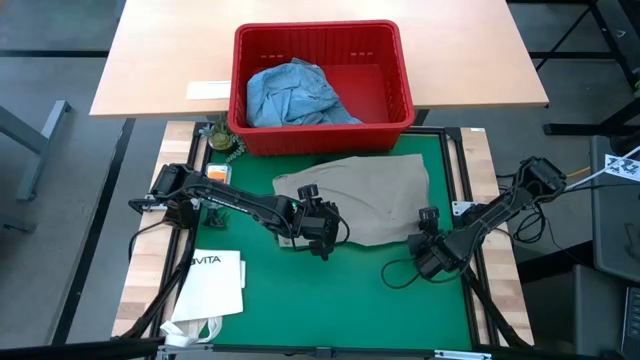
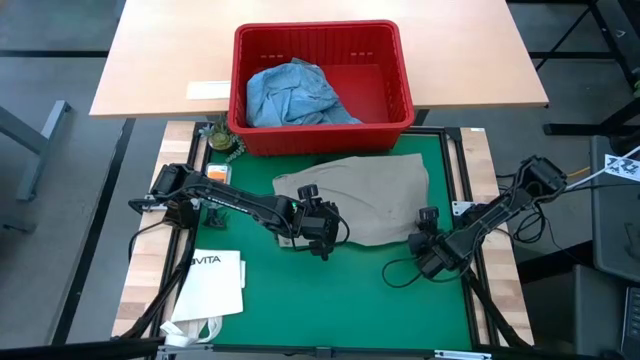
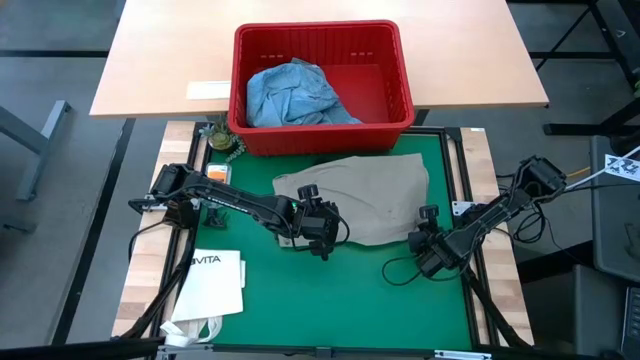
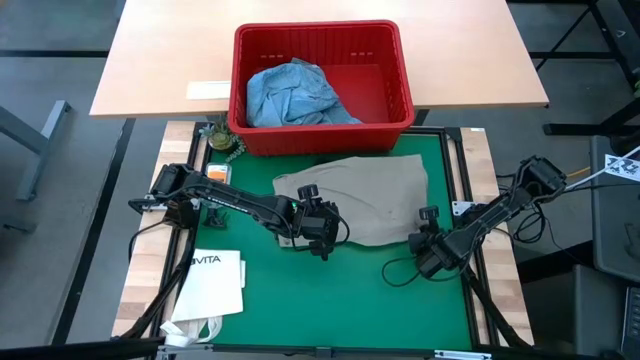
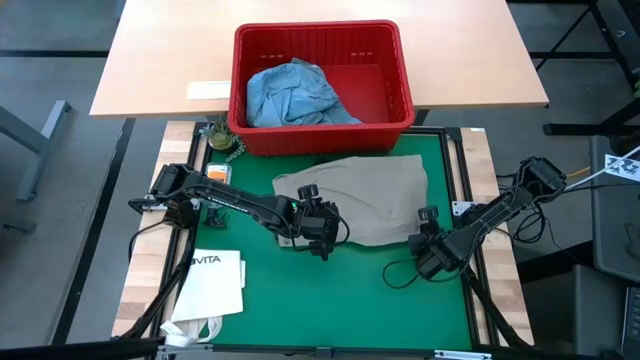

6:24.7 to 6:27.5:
Task: Fold Laundry from Bin
Fold the gray shorts

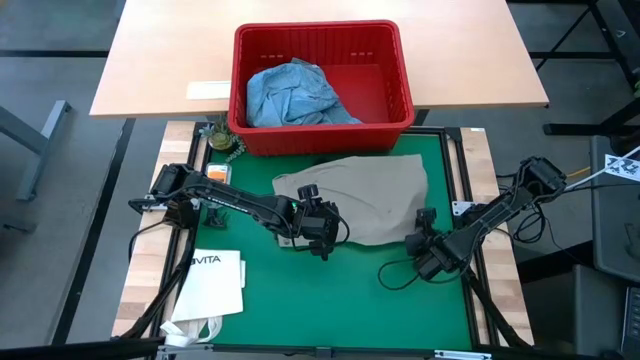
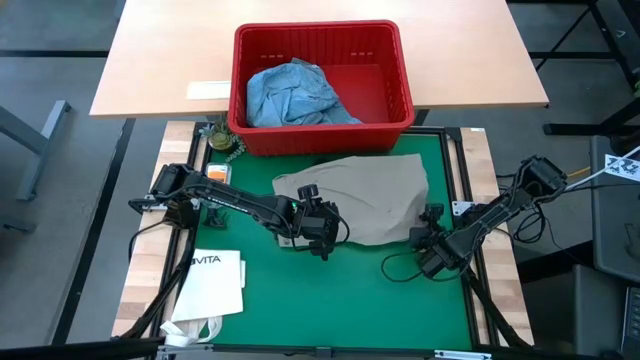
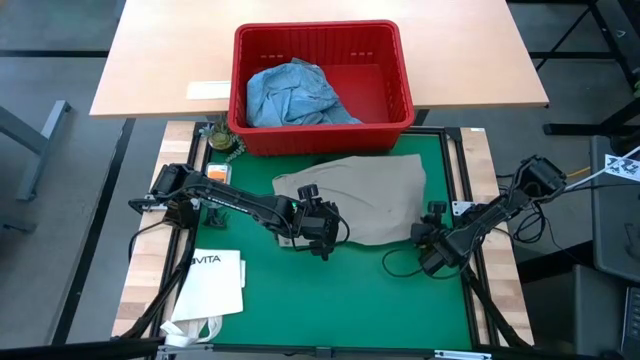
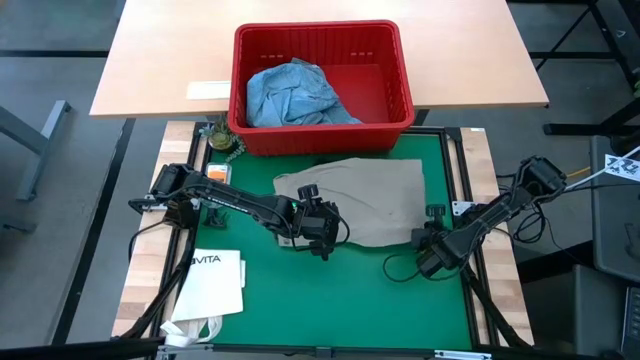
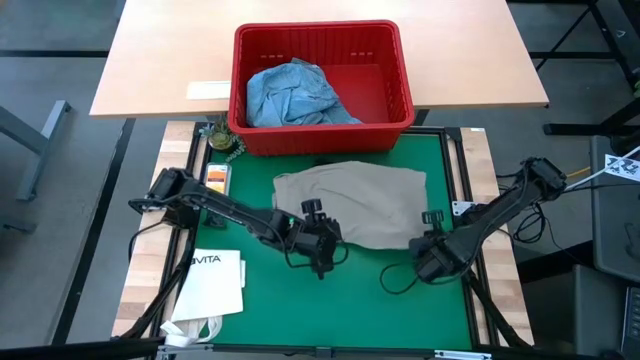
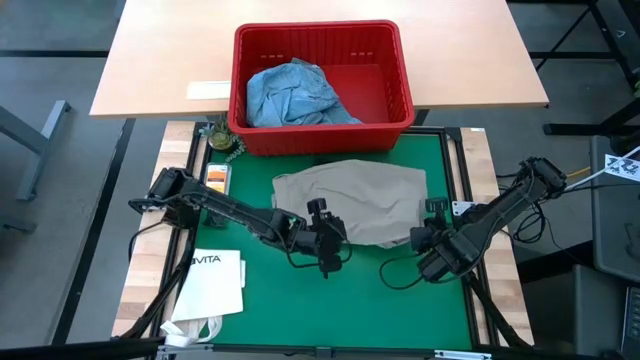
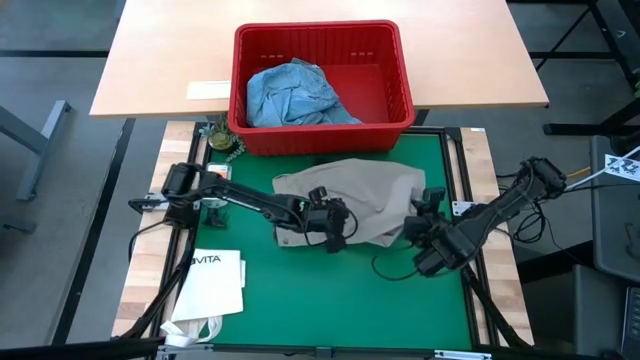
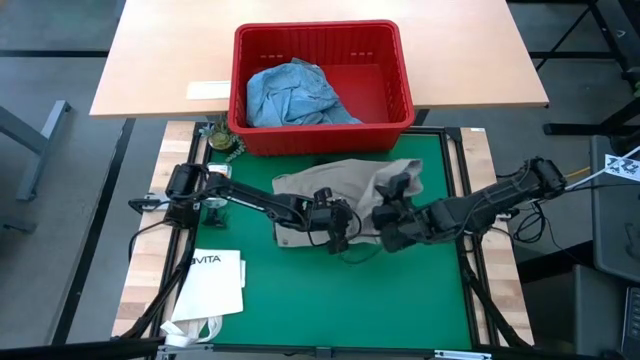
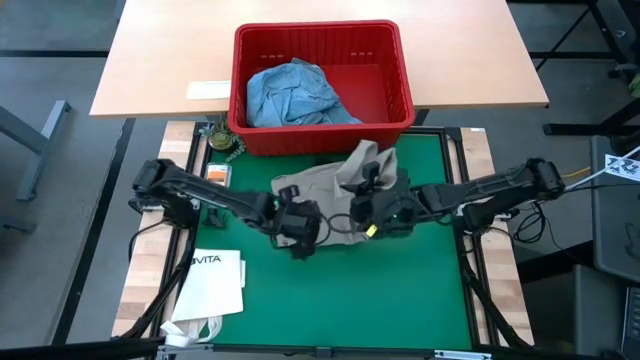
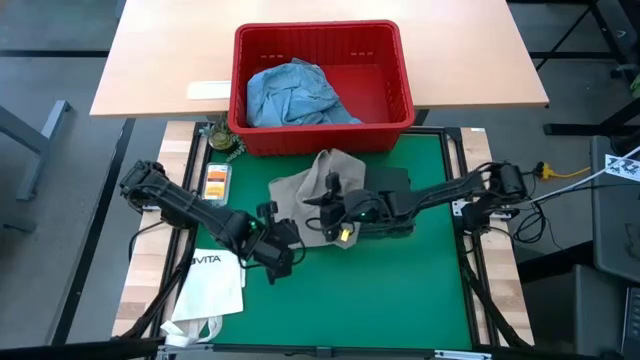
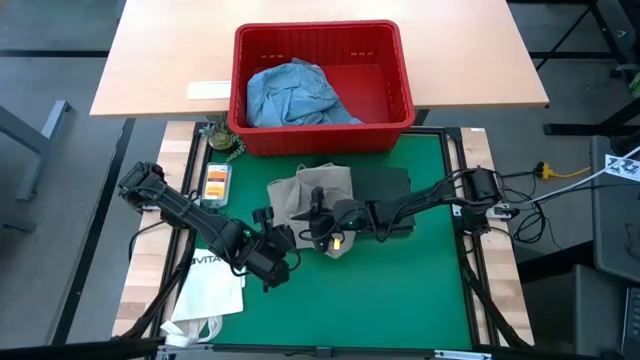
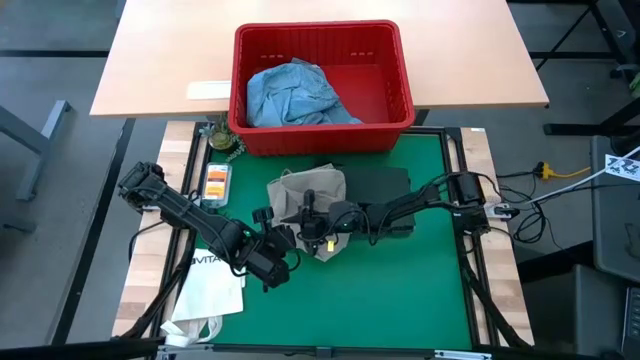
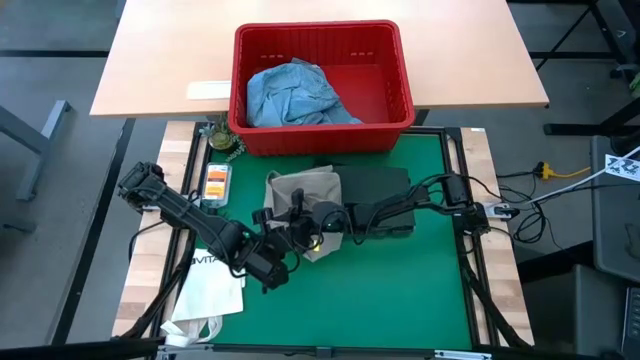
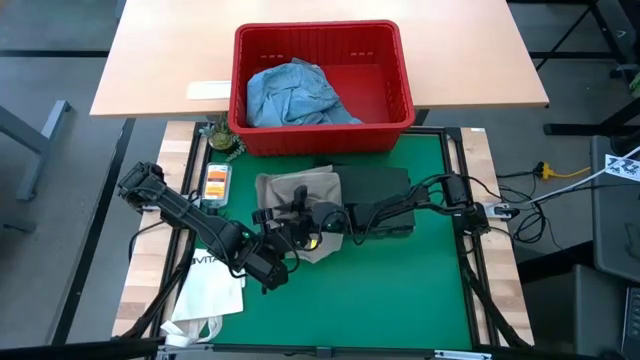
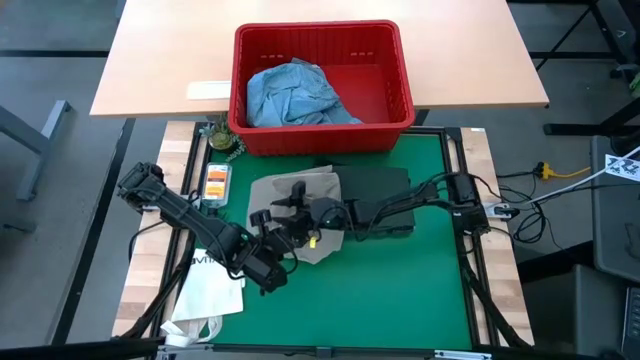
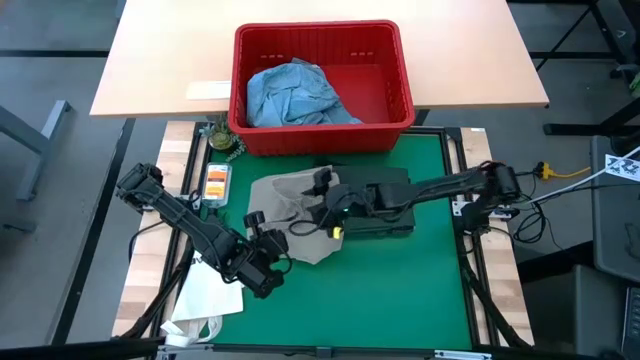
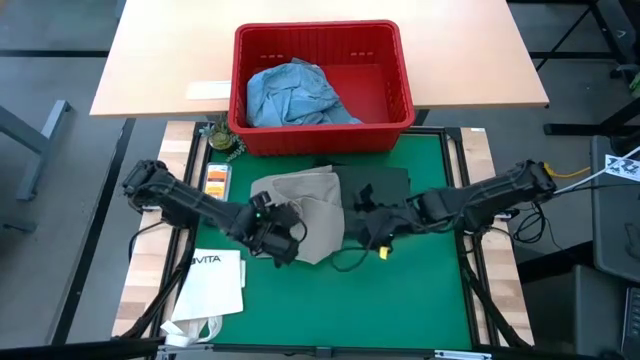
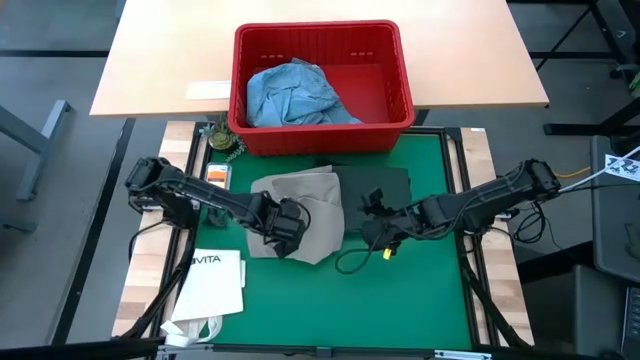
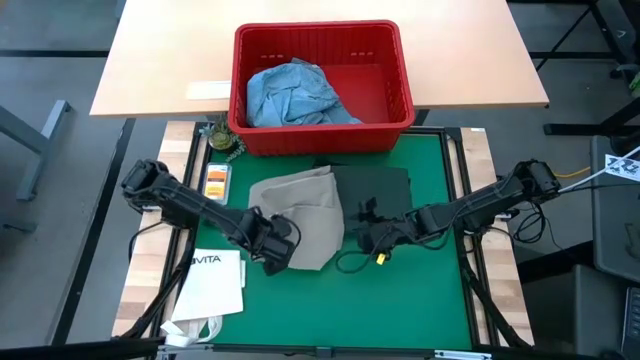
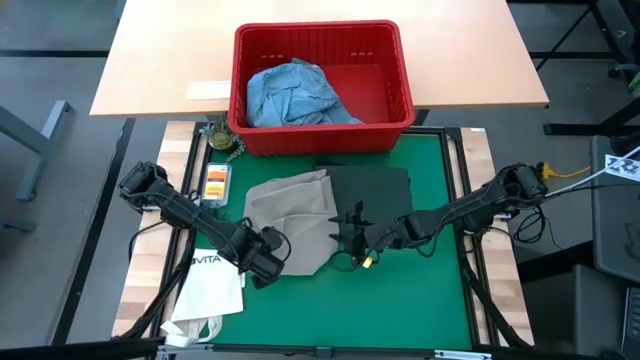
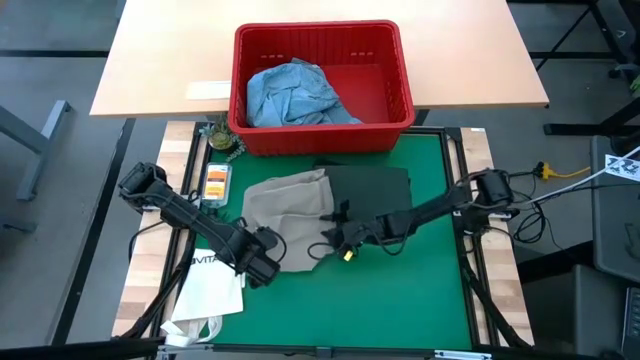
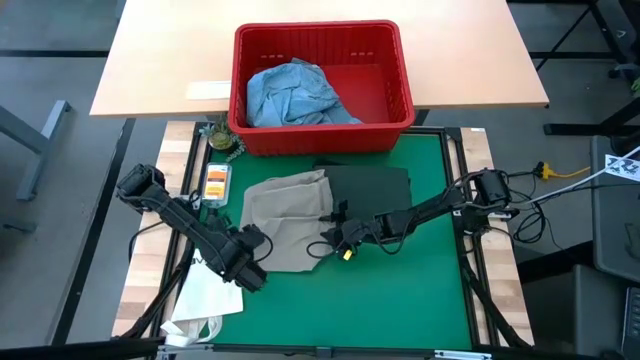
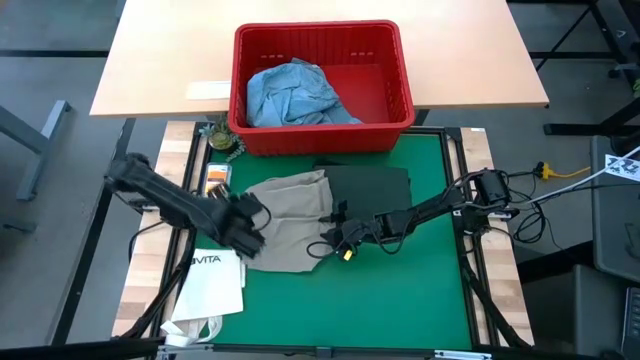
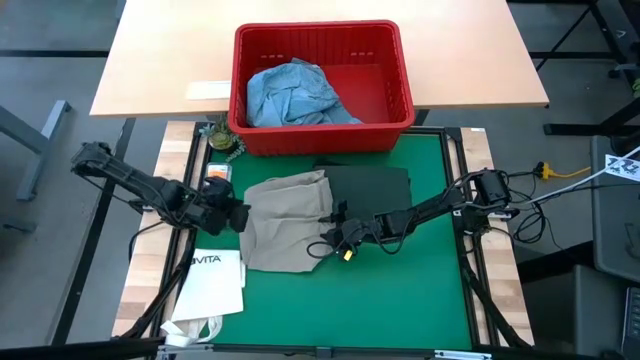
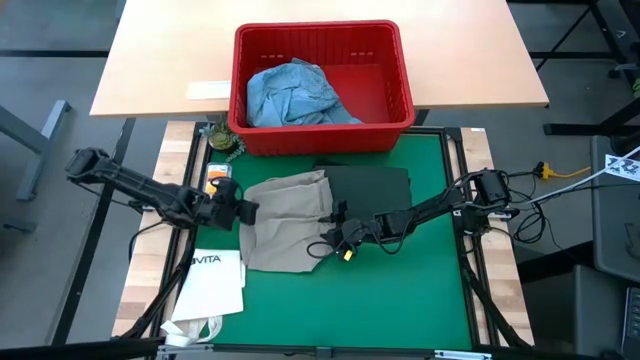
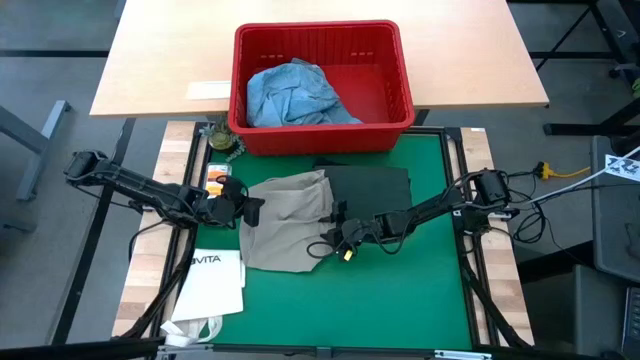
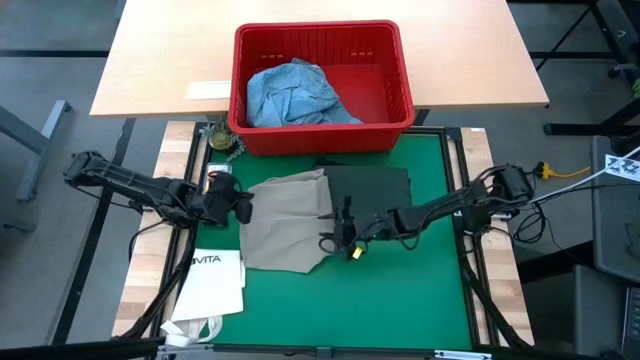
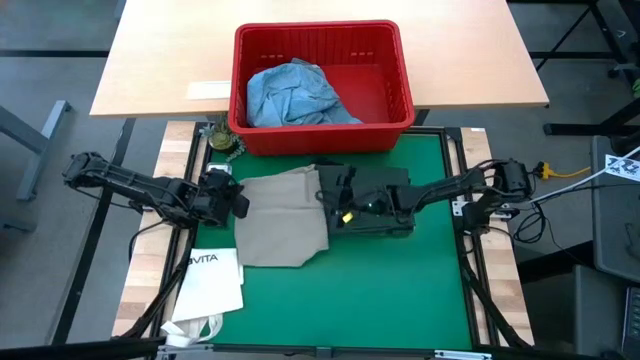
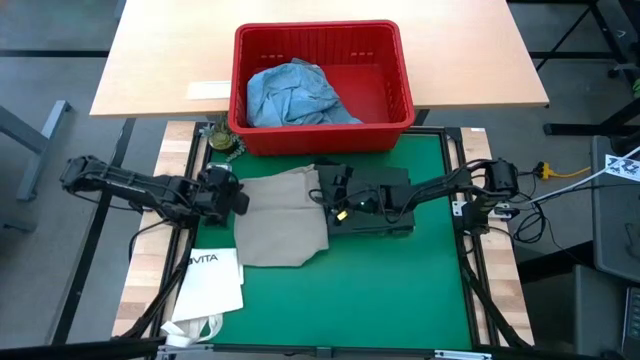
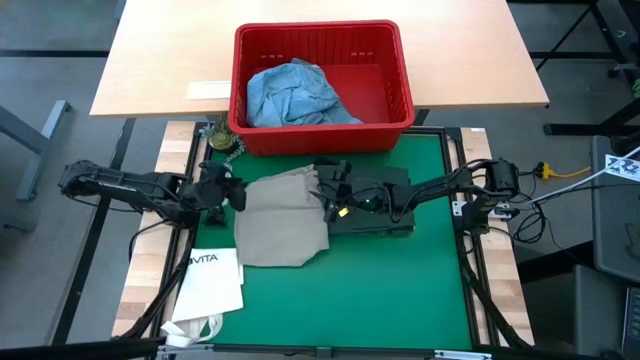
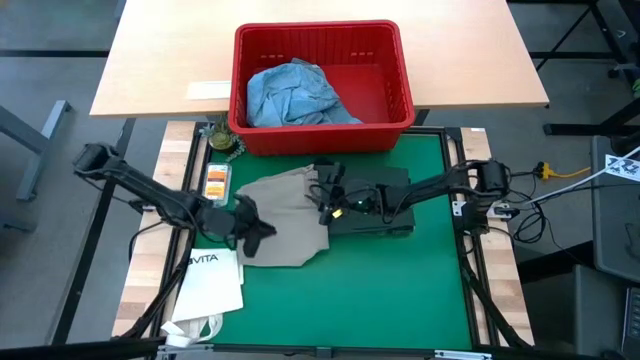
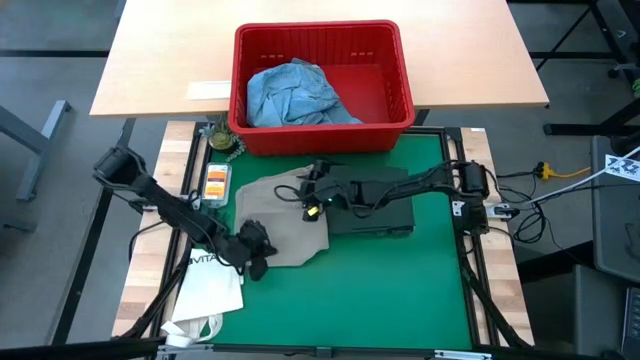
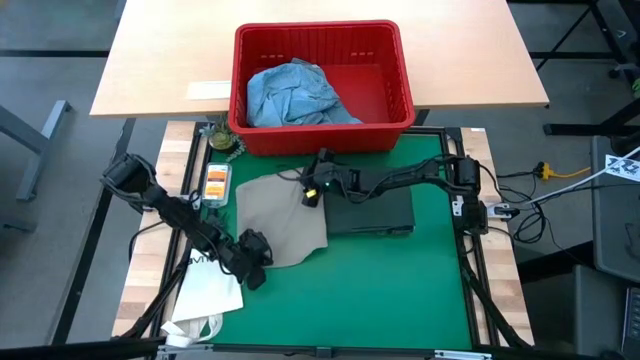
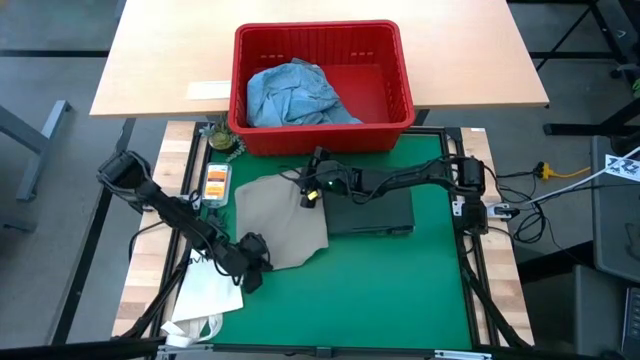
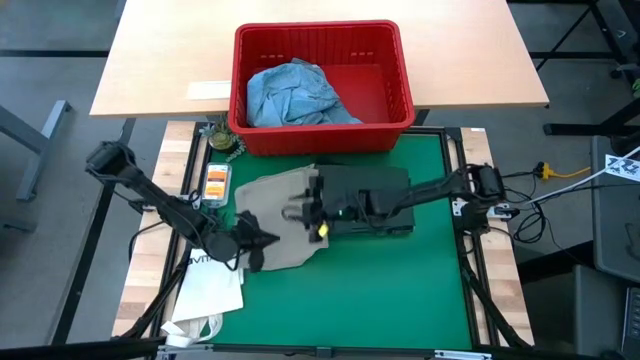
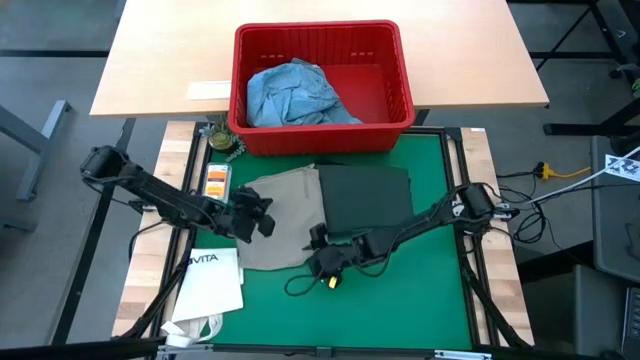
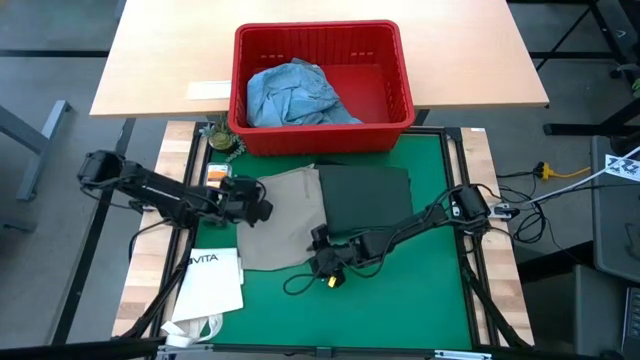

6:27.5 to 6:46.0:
Fold the gray shorts
